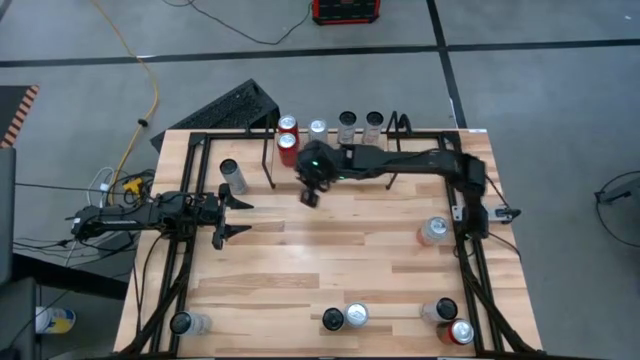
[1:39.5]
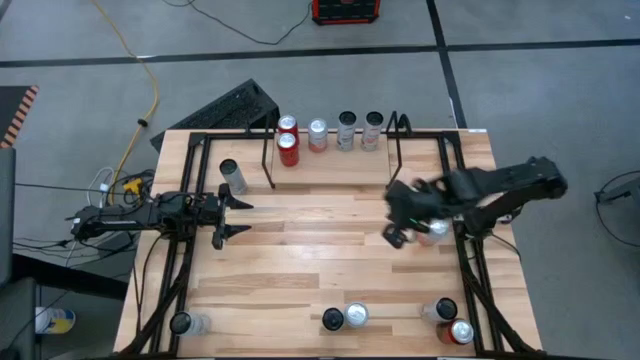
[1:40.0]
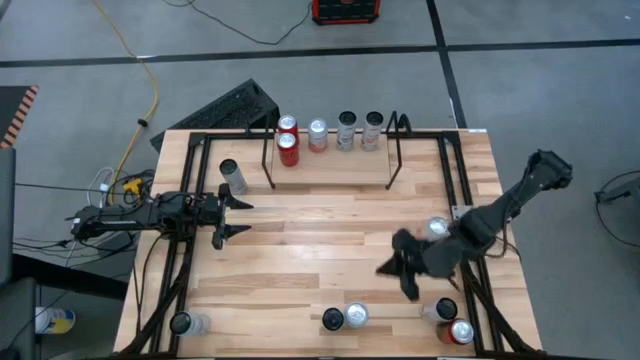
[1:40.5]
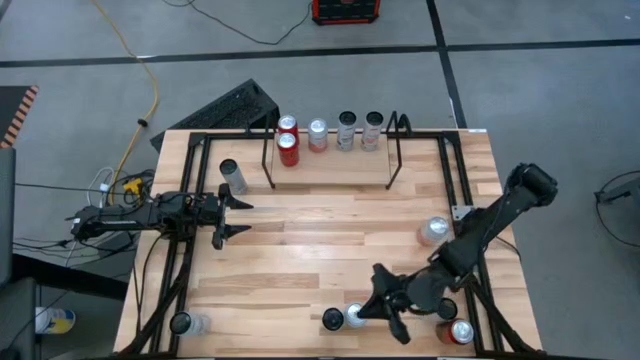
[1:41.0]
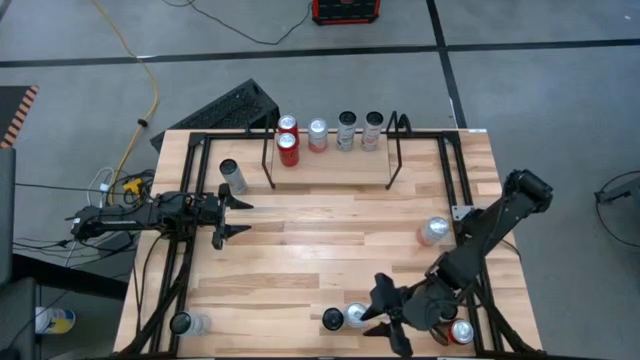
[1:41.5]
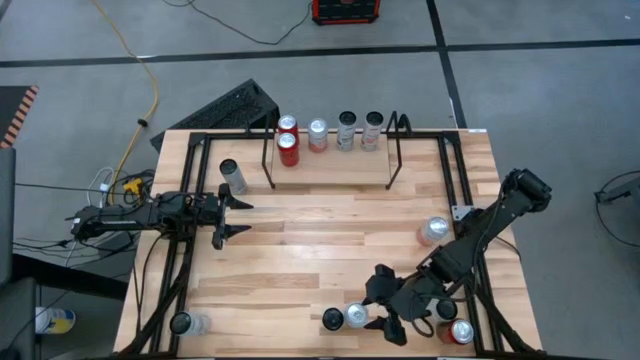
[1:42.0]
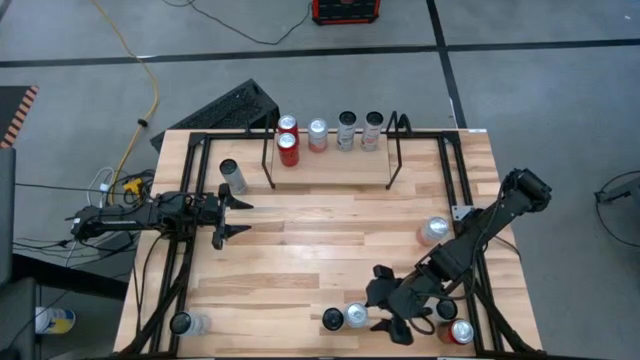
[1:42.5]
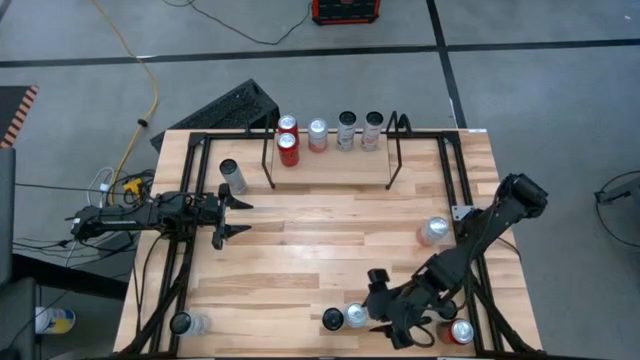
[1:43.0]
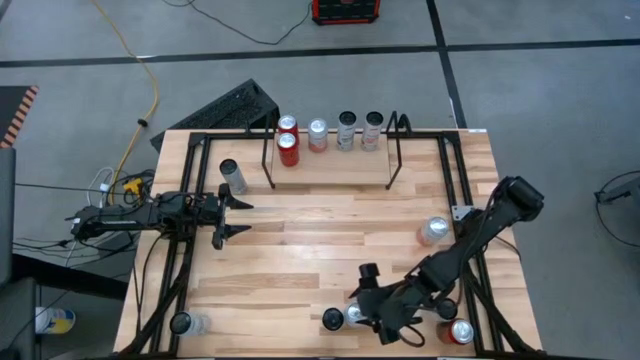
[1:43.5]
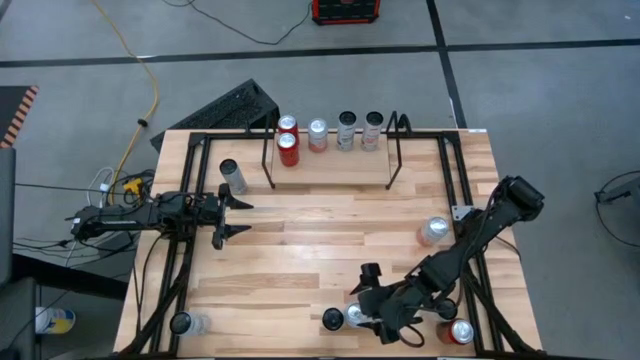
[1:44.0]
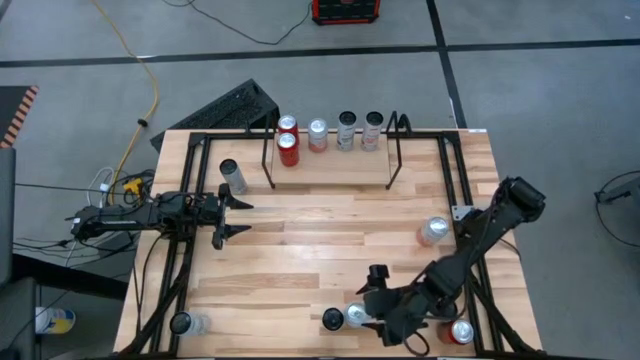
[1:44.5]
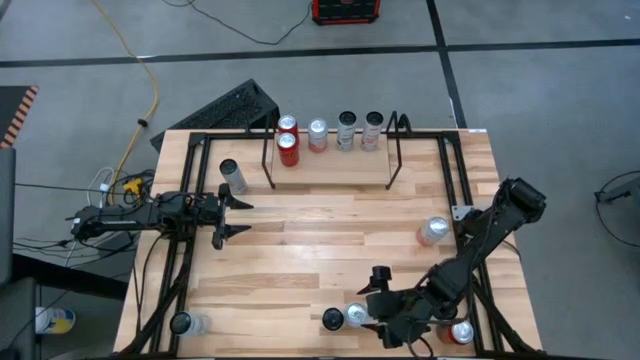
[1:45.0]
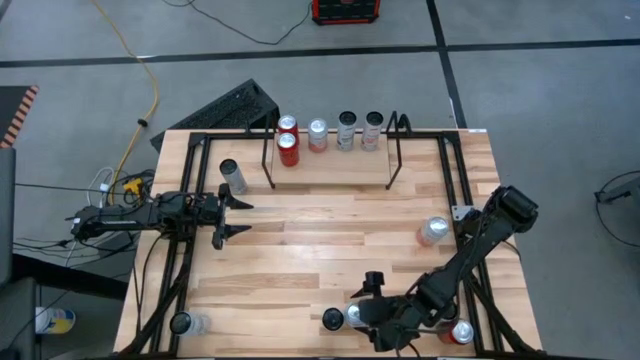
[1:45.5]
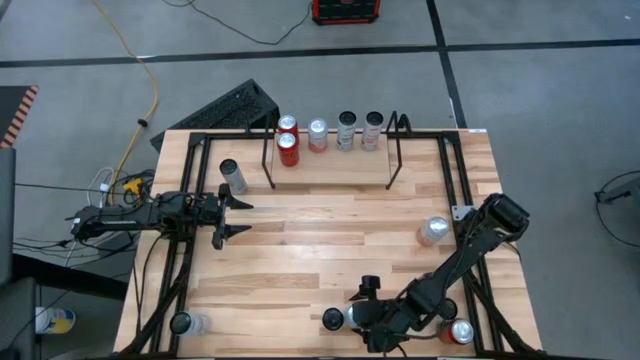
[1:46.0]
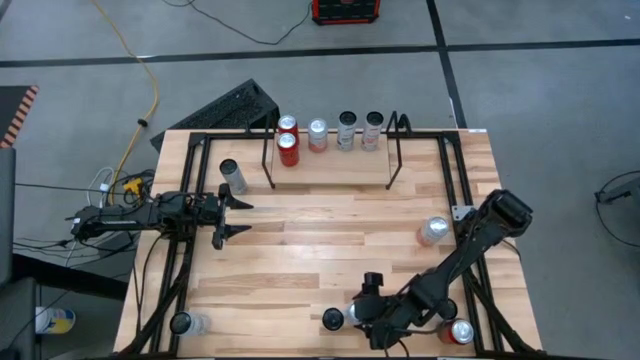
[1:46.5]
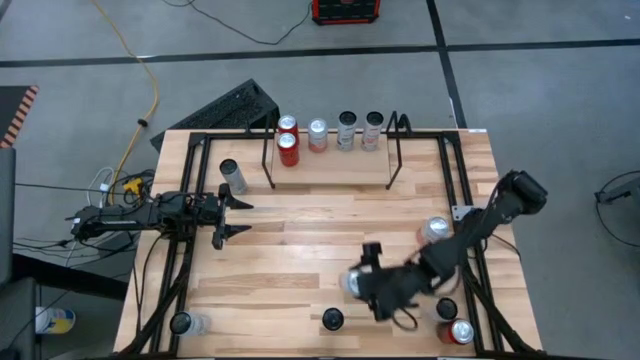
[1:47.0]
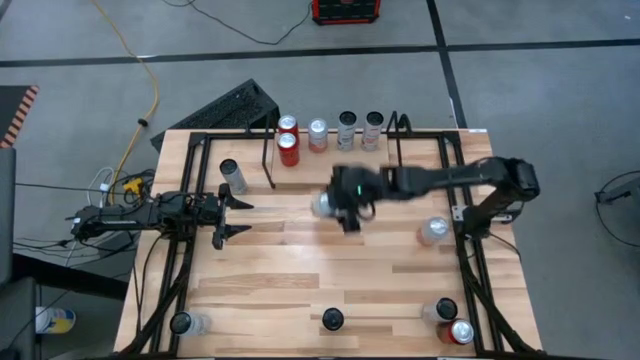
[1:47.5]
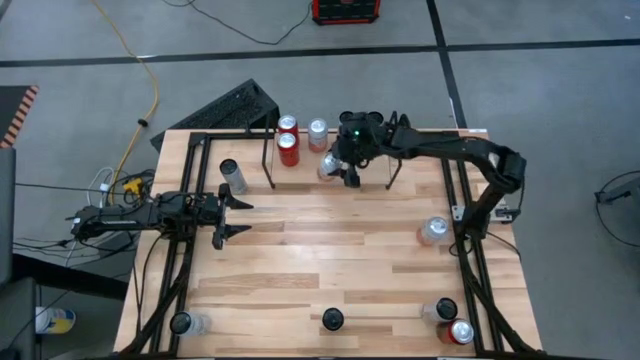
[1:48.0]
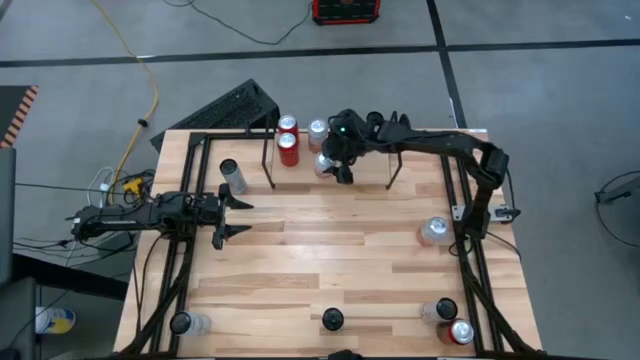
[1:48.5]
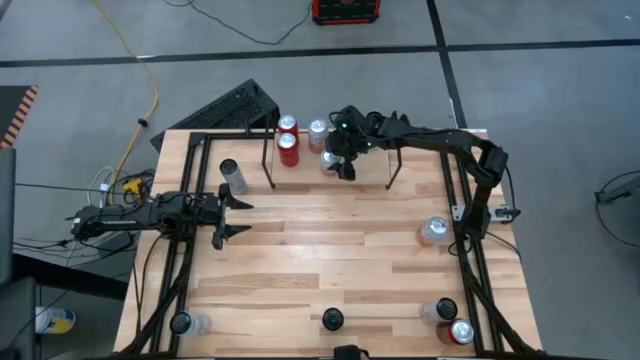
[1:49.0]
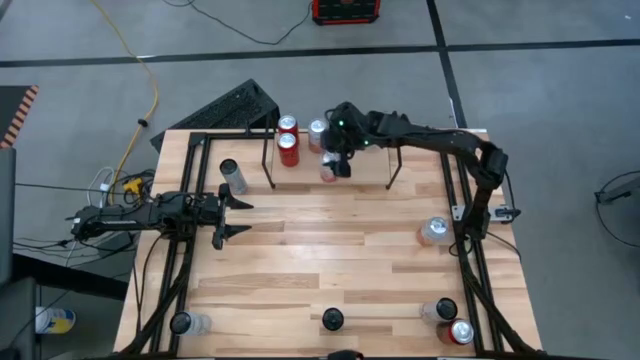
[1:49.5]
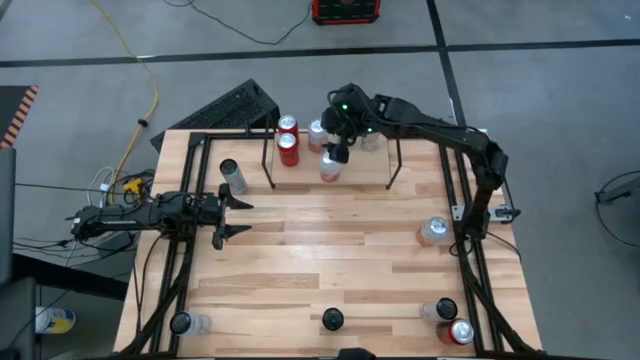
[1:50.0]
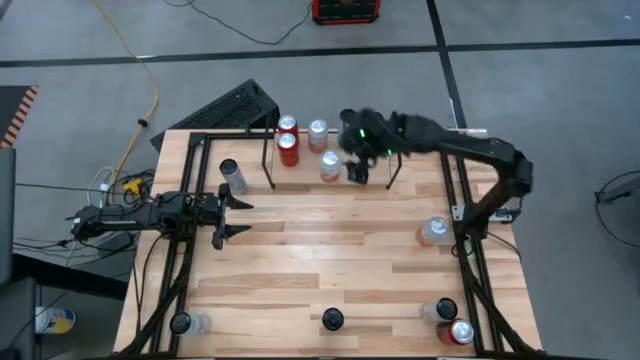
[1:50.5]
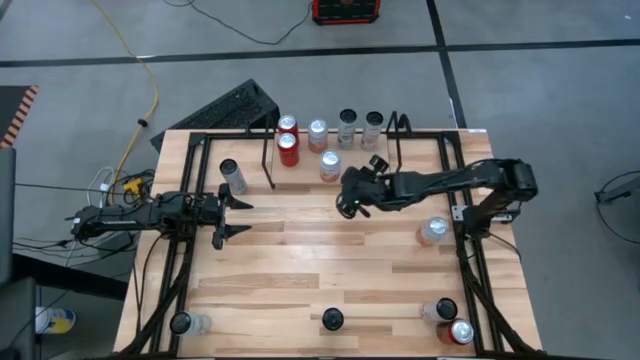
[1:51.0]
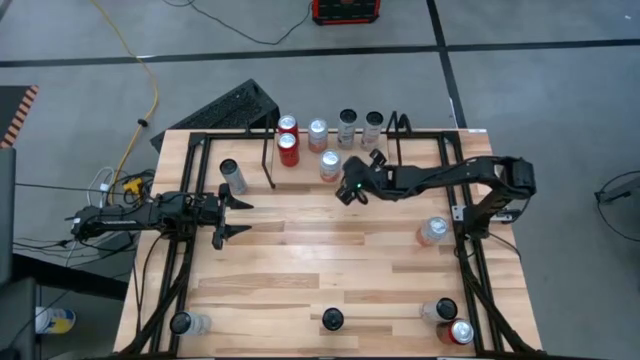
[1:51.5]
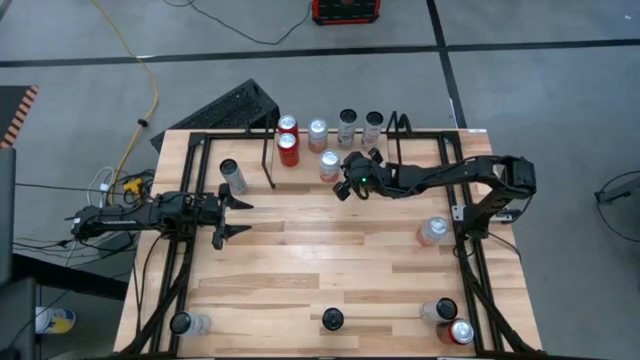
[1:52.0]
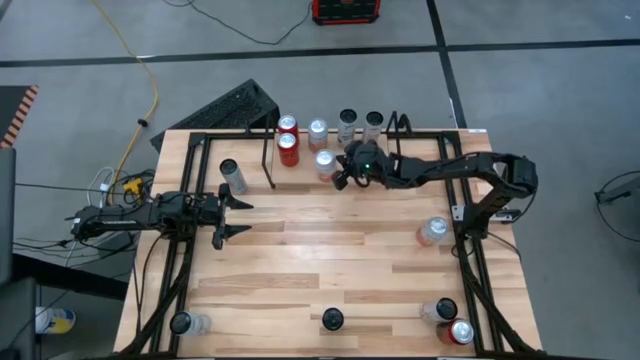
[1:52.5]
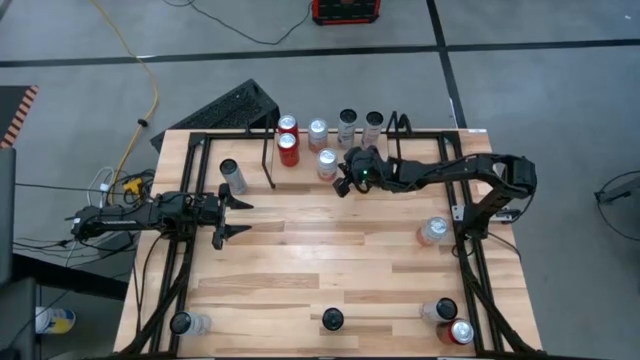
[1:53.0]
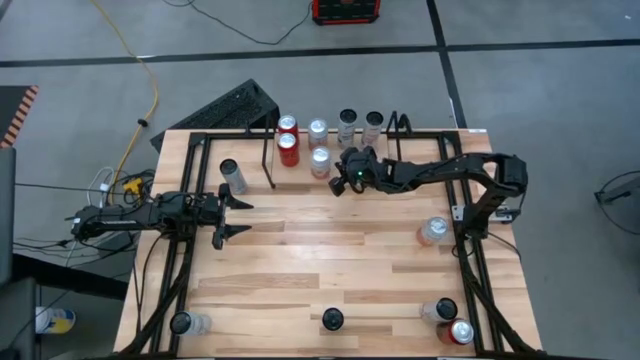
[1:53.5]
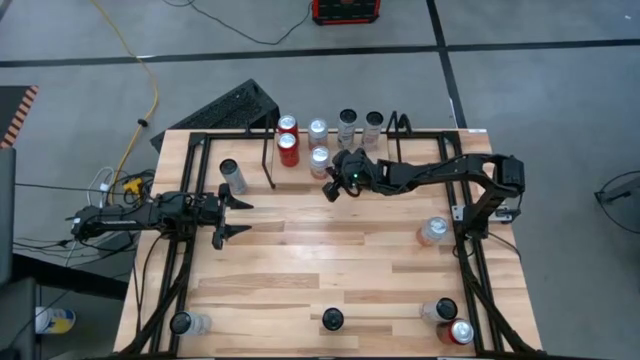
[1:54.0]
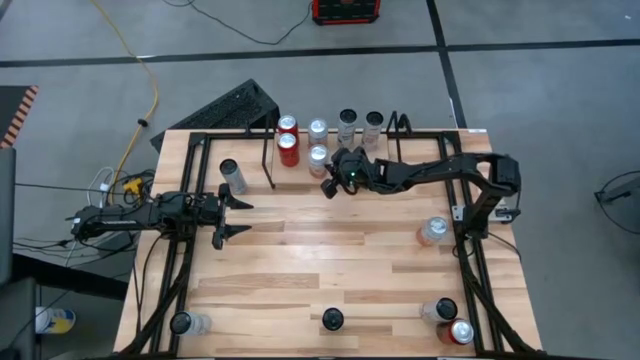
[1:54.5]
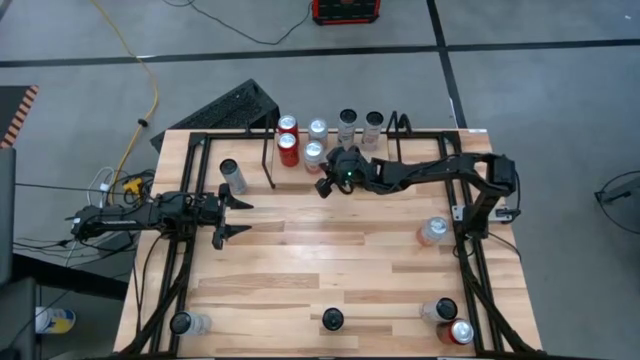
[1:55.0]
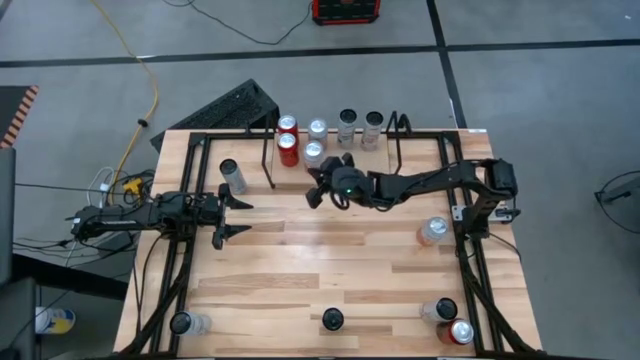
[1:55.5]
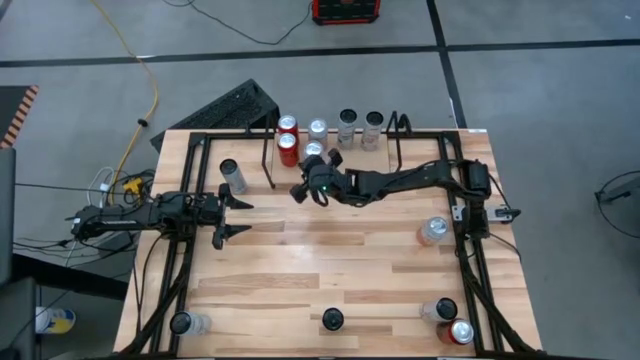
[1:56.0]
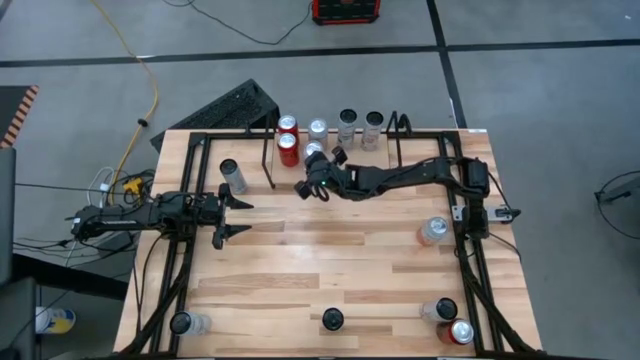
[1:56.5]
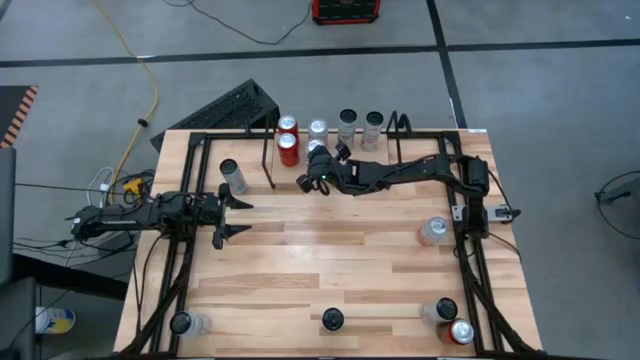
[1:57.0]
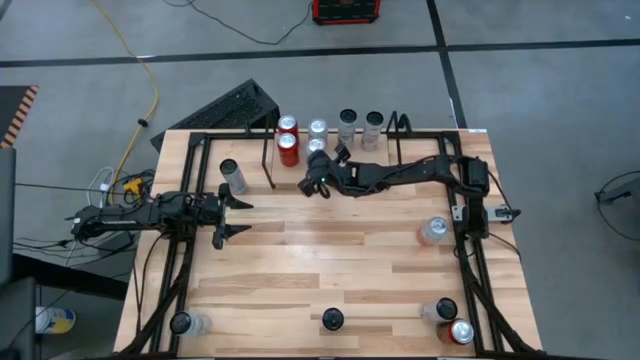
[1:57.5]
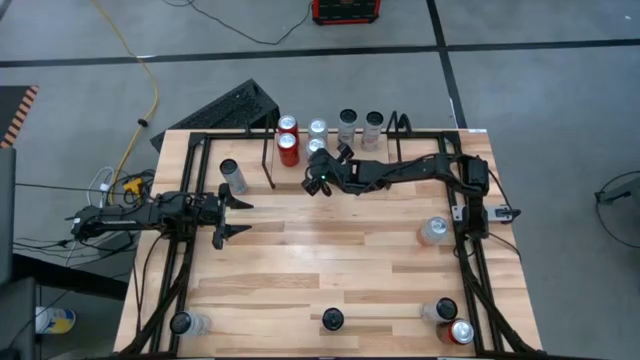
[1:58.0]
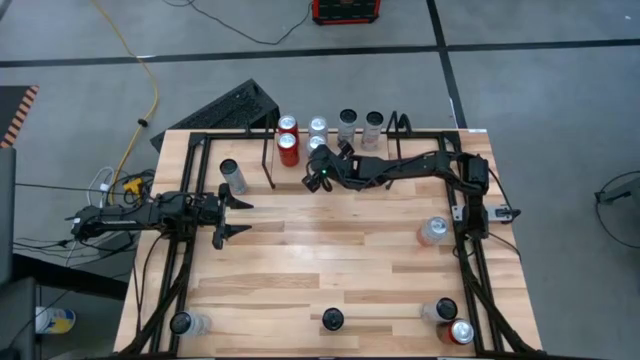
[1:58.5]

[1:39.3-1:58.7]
Task: Place canned beverage on shelf
Put the bottom pink white soda can on the shelf and align with other pink white soda can

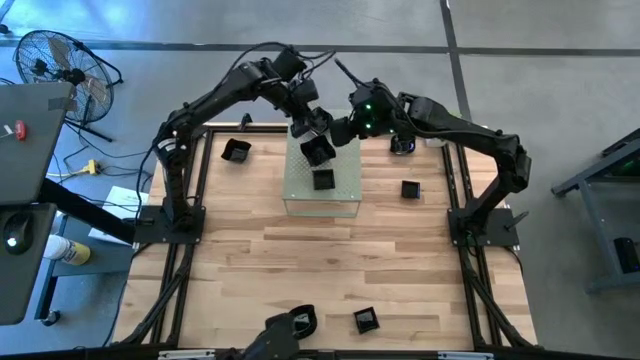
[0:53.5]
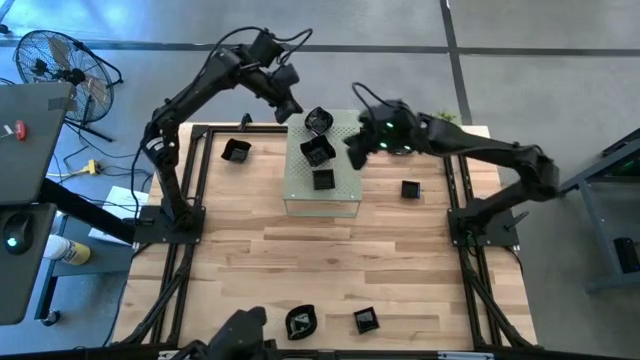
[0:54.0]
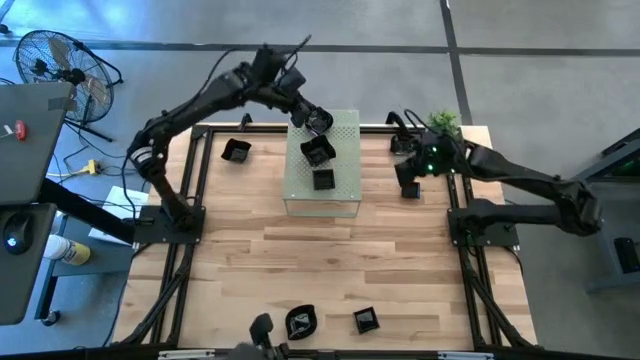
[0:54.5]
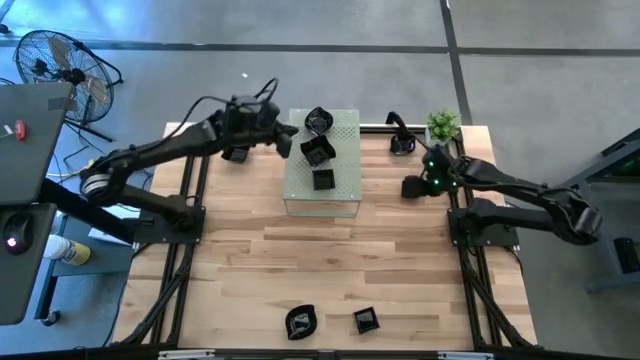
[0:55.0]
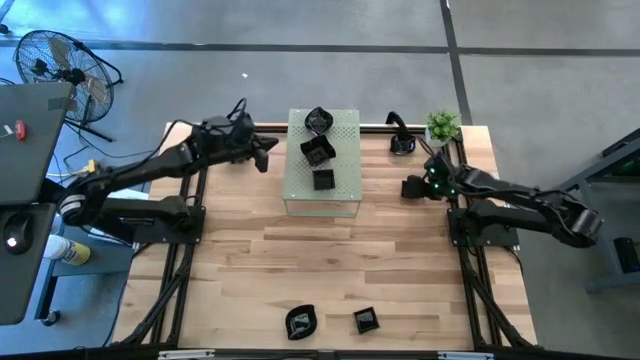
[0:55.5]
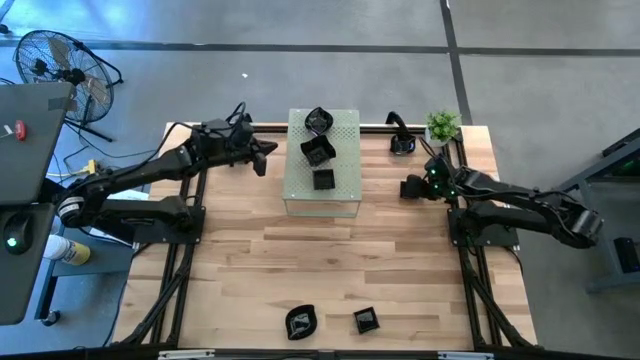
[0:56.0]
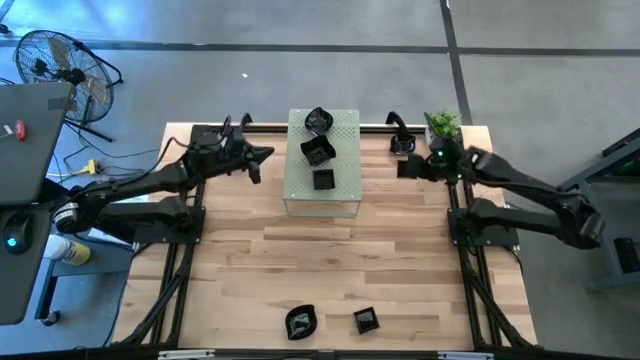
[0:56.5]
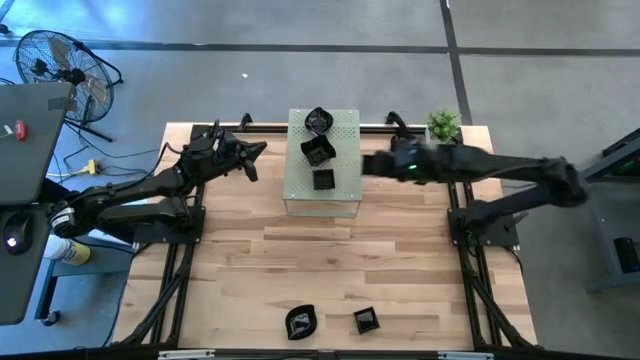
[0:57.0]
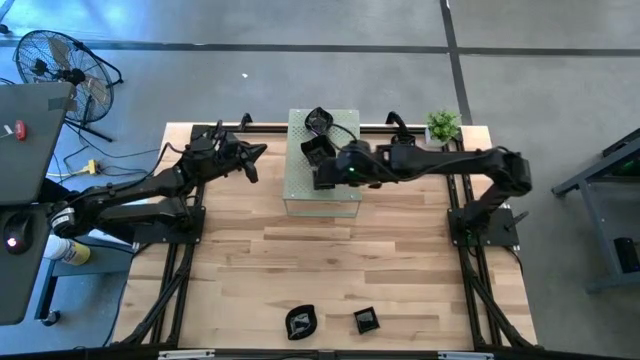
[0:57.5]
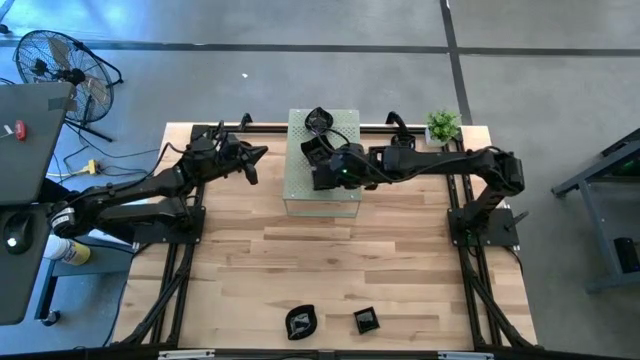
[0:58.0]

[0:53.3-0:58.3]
Task: Pick & Place Mini shaped plates
Stack the top black square plate on top of the black square plate on the shelf
